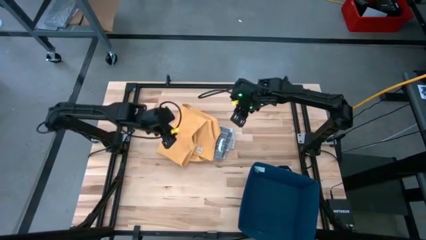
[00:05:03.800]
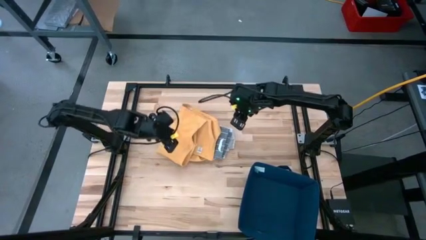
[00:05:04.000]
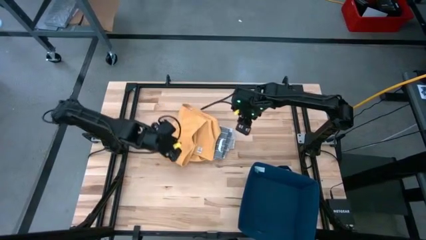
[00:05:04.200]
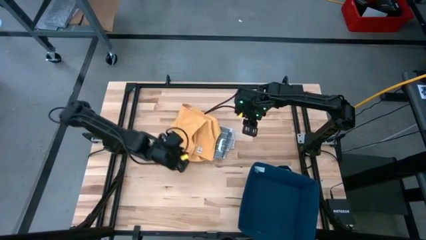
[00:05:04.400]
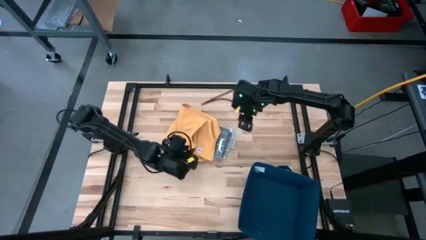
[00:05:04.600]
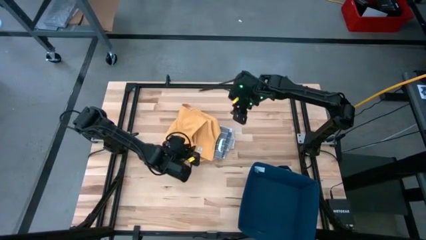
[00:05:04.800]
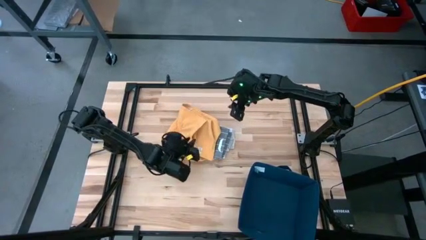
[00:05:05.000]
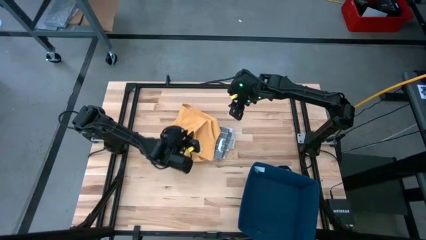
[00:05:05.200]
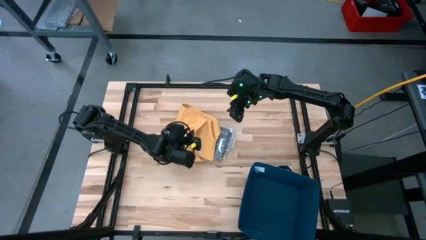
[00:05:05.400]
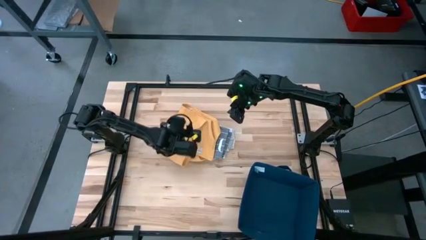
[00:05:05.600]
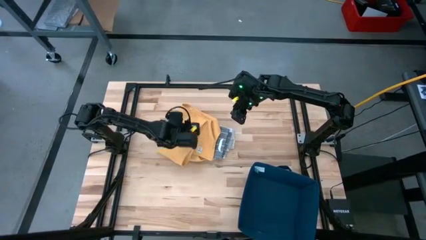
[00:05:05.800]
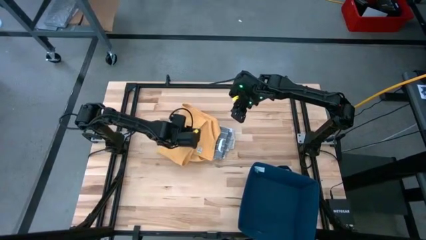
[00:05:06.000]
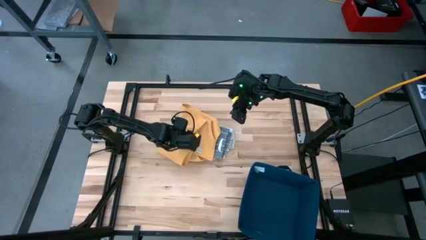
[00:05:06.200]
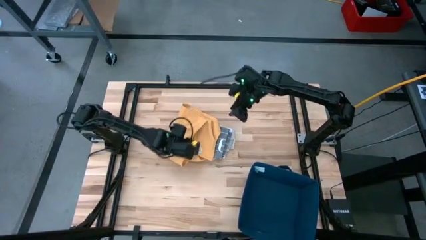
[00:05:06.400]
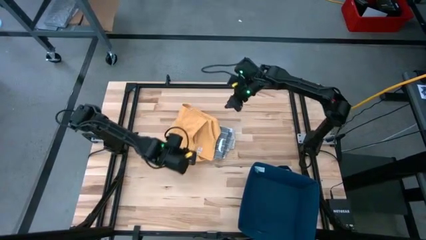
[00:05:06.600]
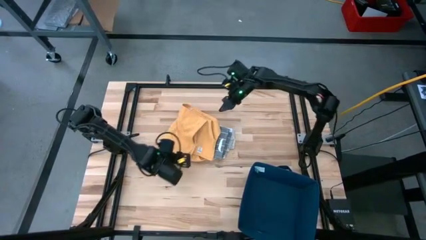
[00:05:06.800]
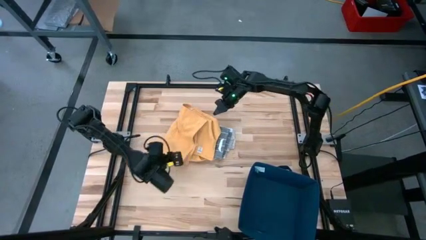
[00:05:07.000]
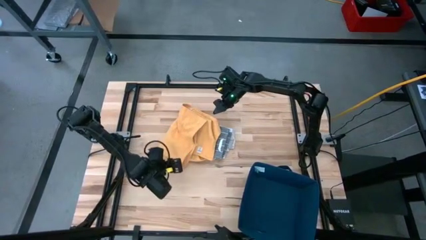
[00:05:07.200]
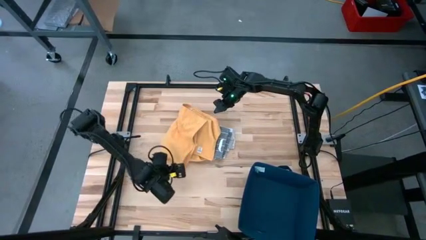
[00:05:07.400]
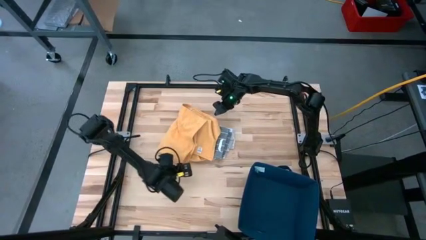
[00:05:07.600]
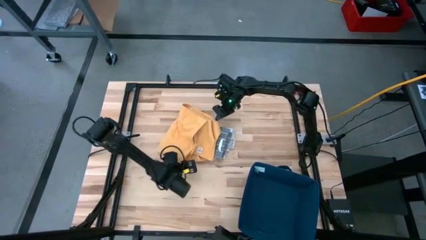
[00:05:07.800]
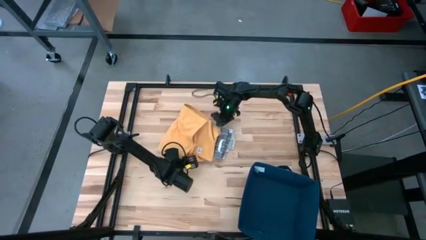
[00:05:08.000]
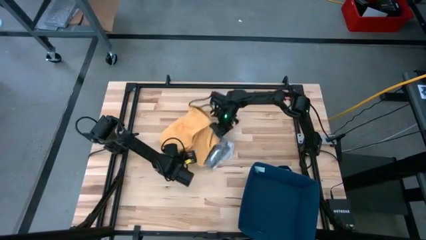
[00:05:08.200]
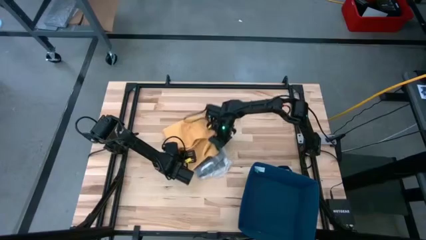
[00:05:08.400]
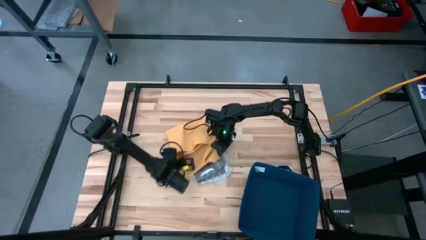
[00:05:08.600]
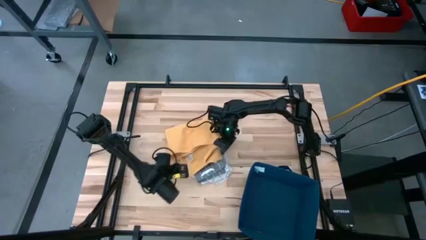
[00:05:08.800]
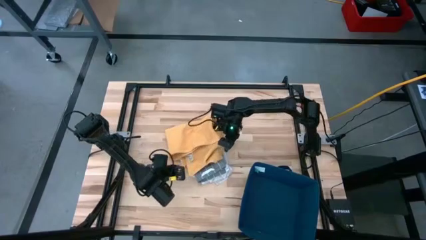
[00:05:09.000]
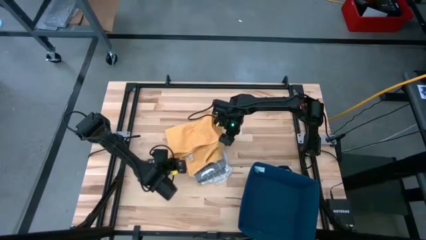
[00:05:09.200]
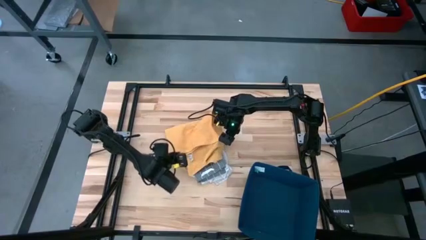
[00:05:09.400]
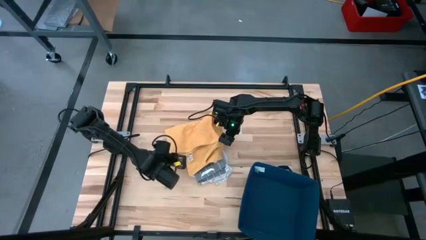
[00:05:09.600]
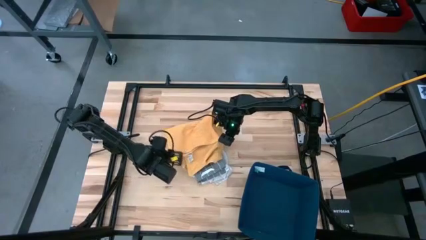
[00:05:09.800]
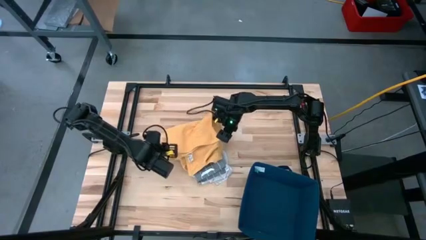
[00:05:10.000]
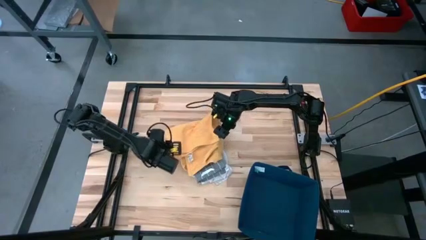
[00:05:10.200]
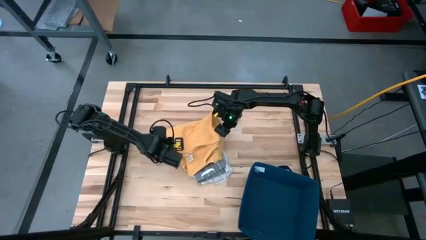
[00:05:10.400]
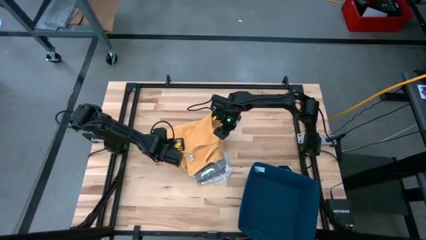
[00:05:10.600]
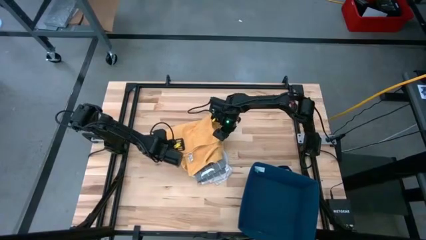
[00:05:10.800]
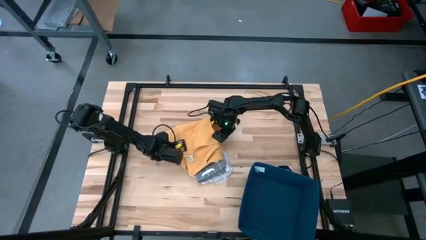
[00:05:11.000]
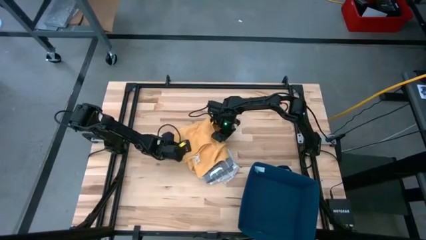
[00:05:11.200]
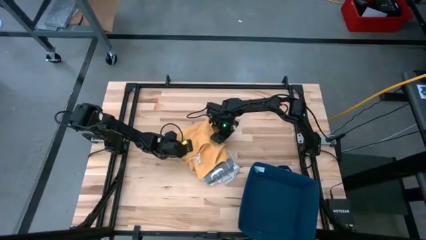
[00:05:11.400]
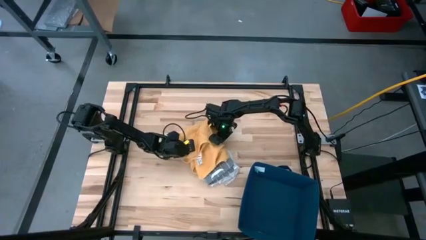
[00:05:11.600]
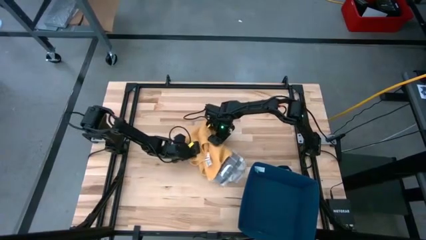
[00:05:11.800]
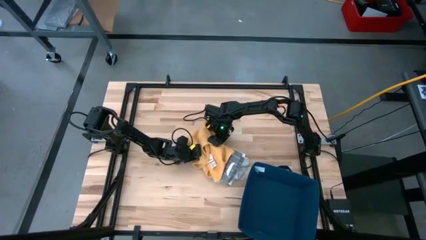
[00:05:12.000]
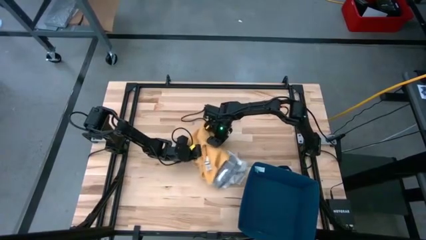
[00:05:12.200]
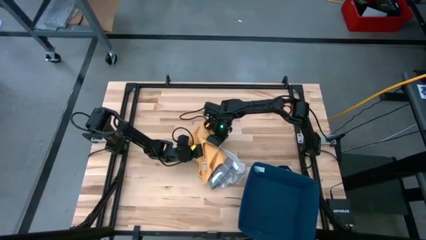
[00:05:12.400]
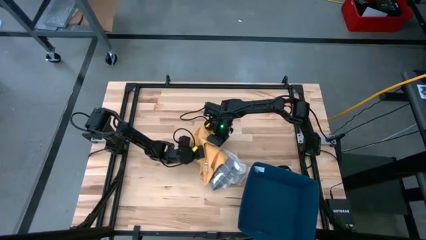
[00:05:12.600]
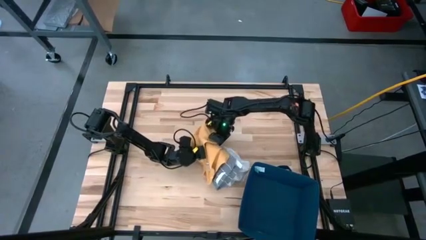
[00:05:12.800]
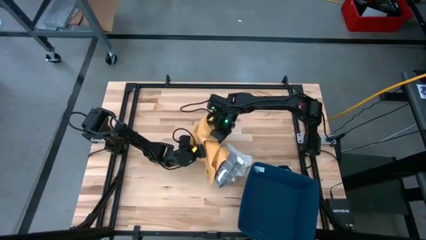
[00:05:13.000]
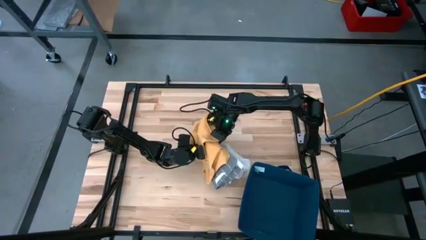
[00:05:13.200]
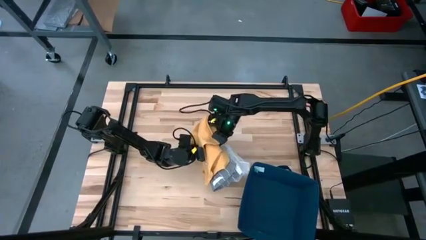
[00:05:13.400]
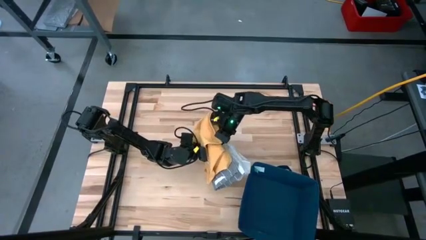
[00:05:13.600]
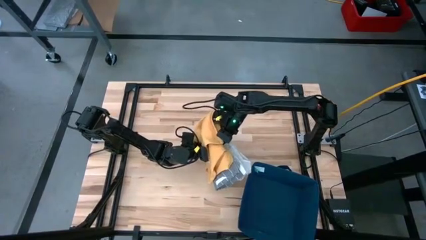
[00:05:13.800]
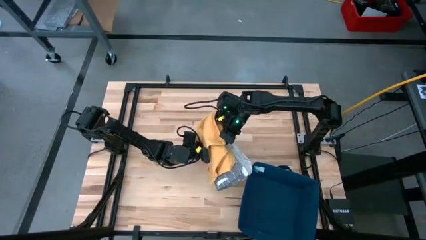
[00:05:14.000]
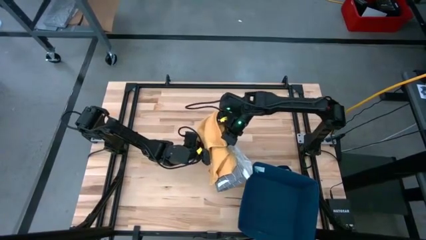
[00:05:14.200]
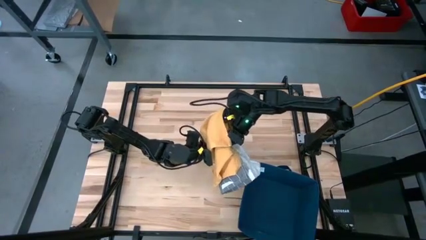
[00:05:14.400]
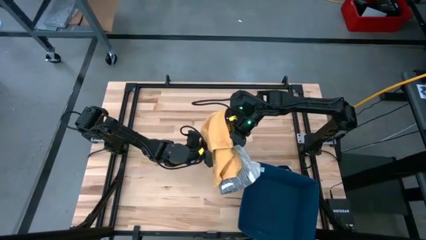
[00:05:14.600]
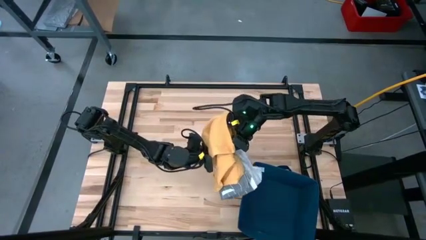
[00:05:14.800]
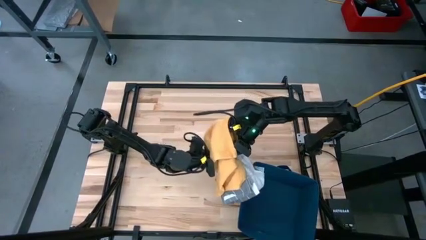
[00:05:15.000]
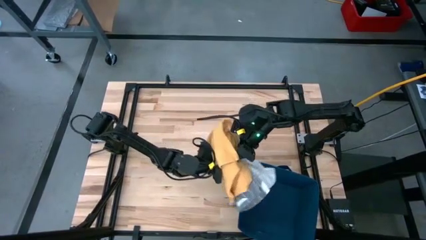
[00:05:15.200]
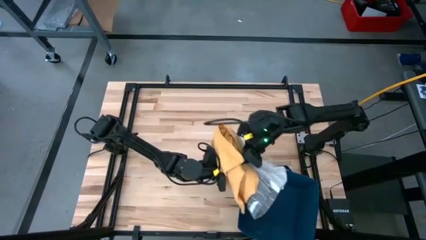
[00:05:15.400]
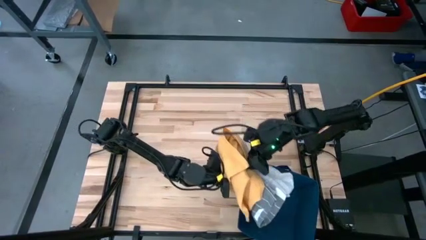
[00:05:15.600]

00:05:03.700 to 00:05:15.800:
Task: Fold towel
Put the kitchen towels into the blue laundry bin
